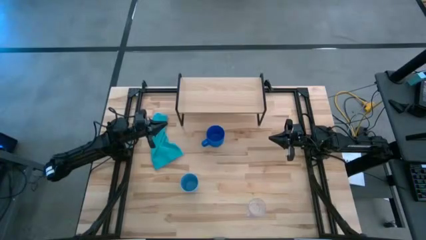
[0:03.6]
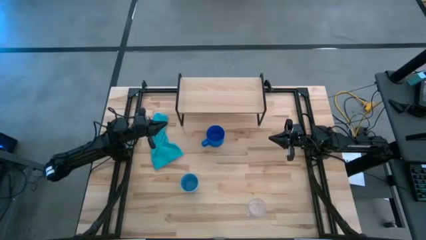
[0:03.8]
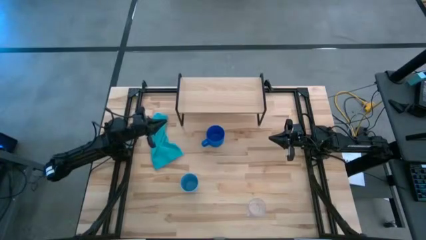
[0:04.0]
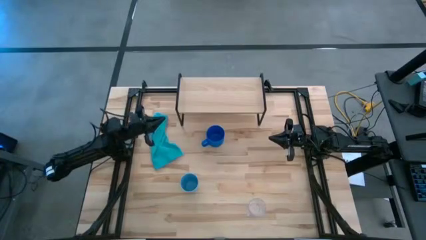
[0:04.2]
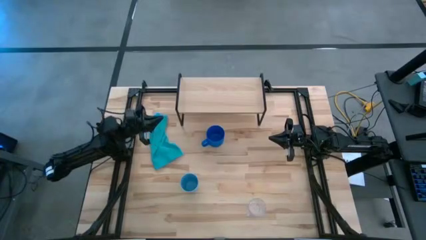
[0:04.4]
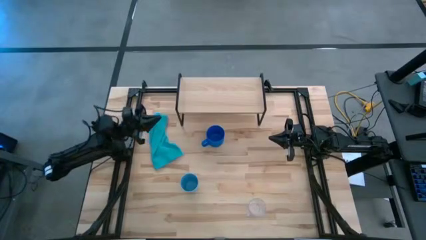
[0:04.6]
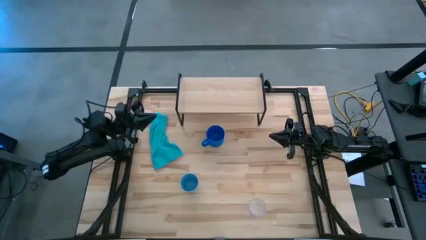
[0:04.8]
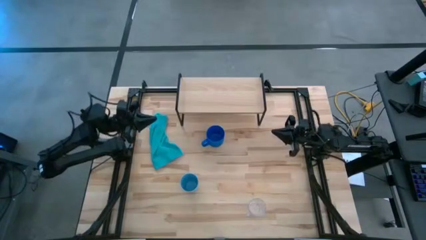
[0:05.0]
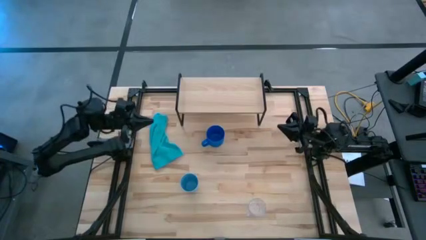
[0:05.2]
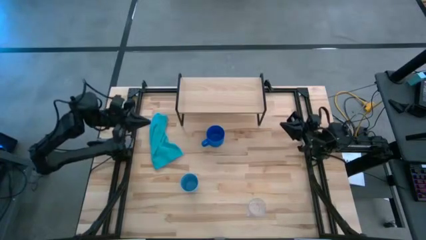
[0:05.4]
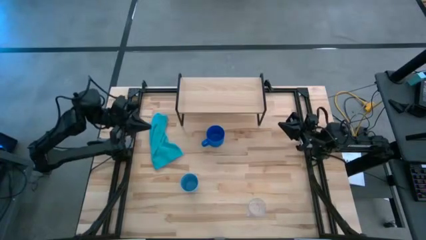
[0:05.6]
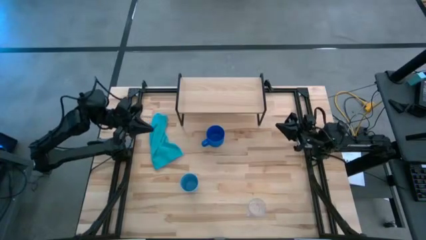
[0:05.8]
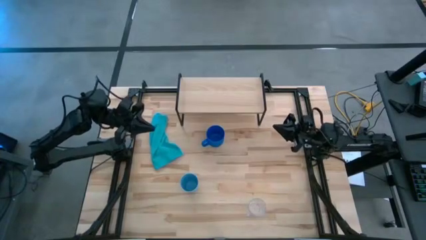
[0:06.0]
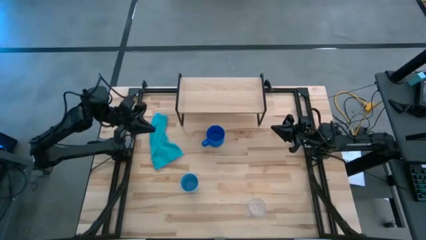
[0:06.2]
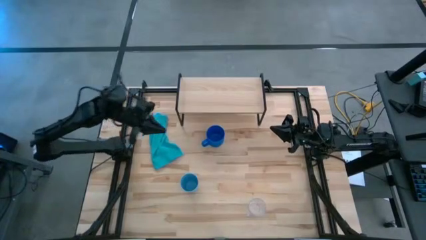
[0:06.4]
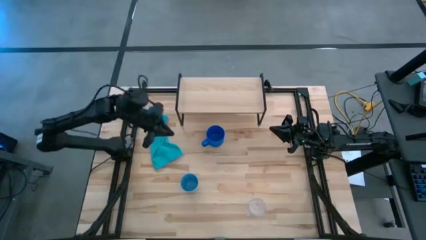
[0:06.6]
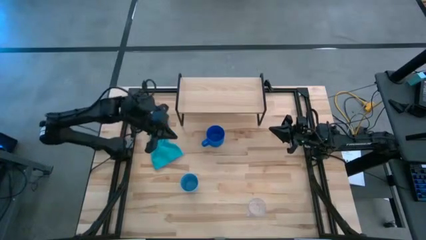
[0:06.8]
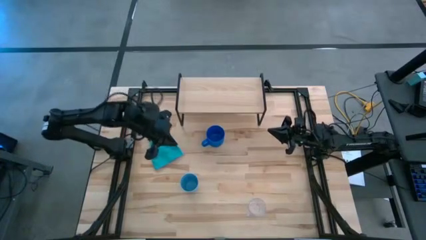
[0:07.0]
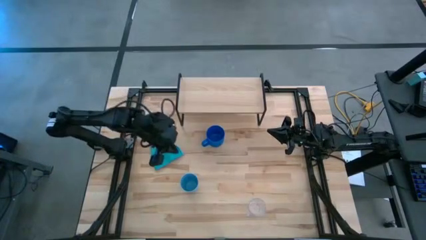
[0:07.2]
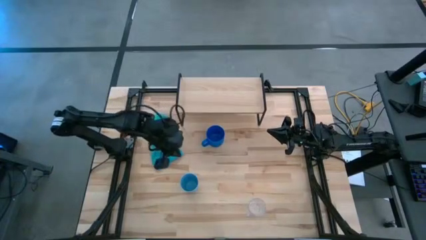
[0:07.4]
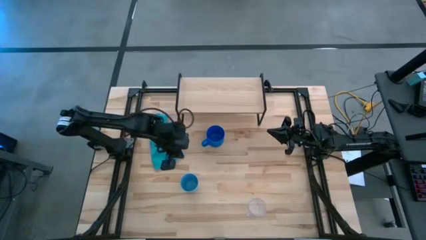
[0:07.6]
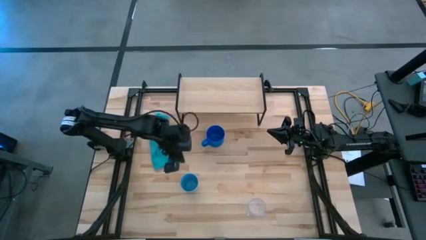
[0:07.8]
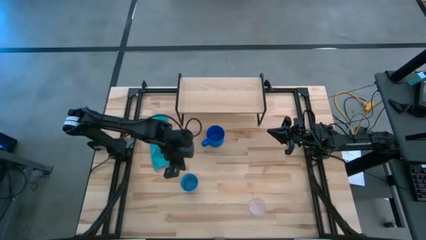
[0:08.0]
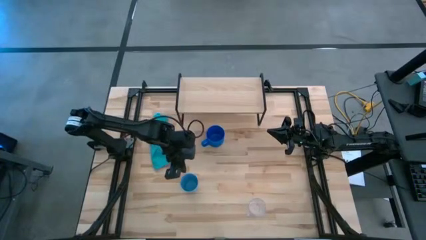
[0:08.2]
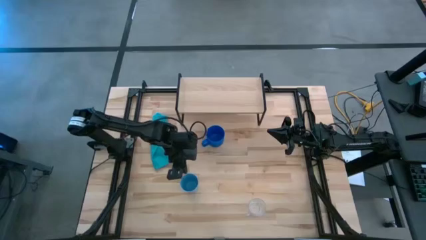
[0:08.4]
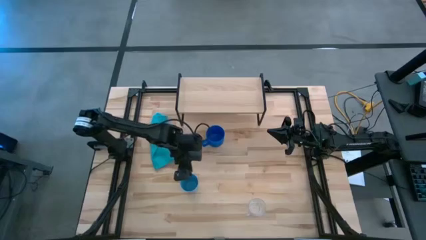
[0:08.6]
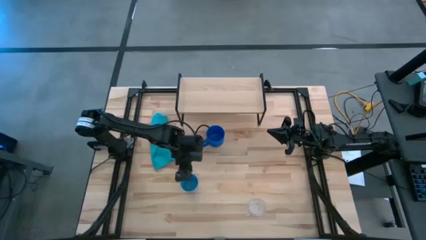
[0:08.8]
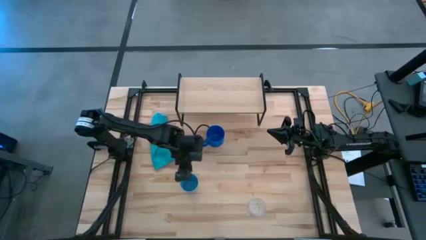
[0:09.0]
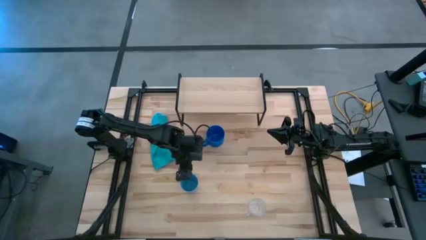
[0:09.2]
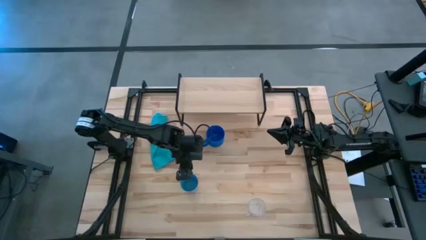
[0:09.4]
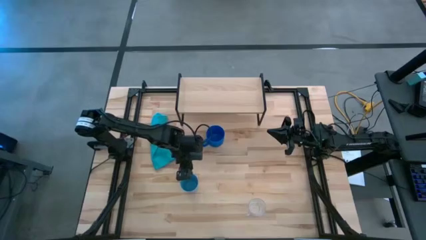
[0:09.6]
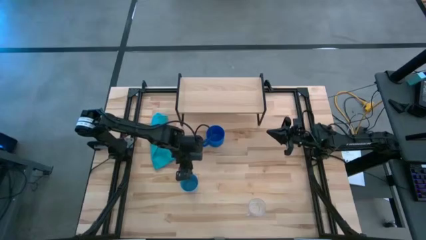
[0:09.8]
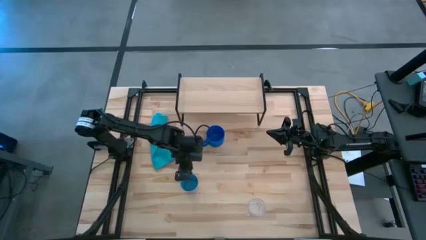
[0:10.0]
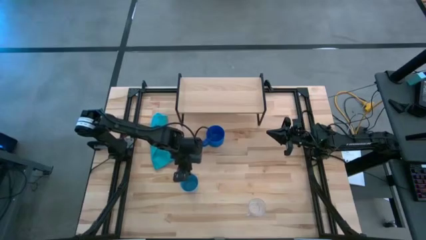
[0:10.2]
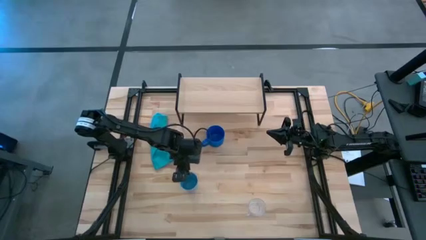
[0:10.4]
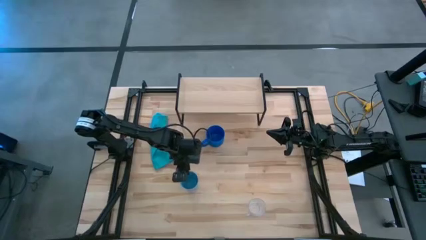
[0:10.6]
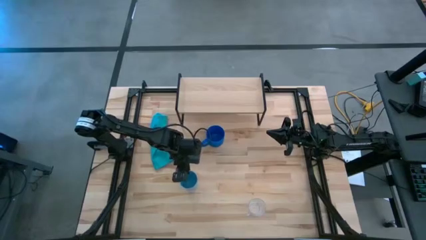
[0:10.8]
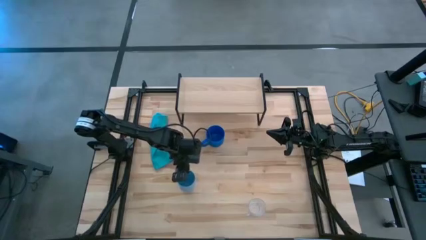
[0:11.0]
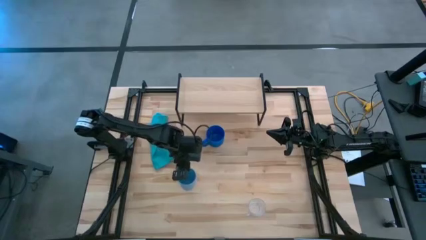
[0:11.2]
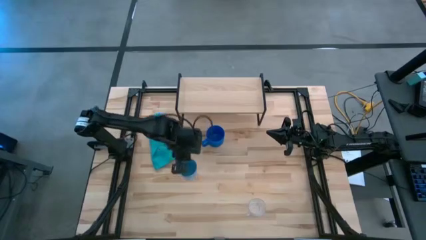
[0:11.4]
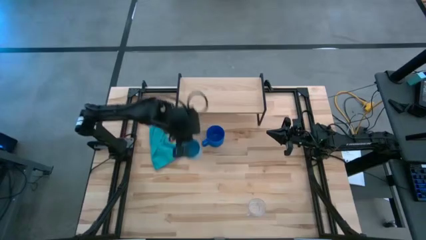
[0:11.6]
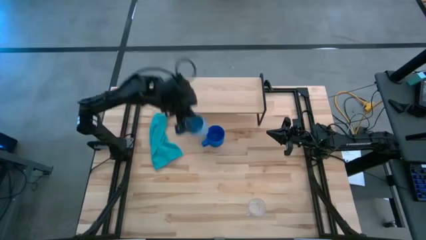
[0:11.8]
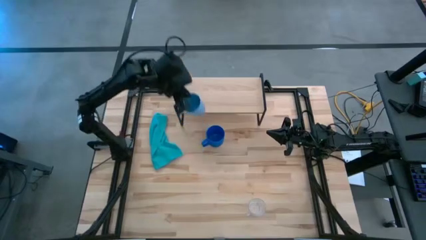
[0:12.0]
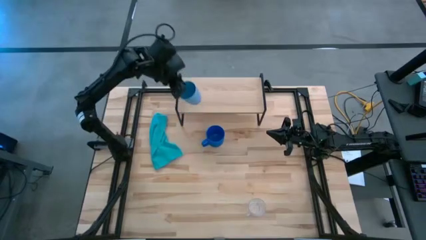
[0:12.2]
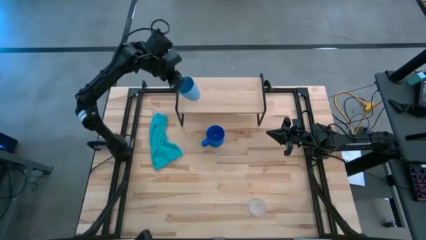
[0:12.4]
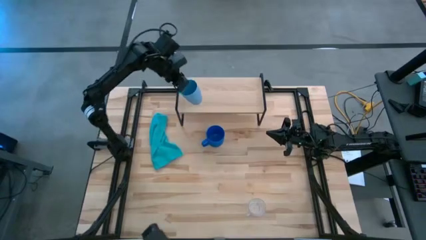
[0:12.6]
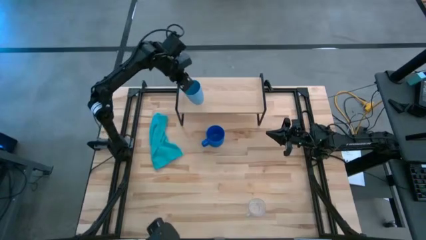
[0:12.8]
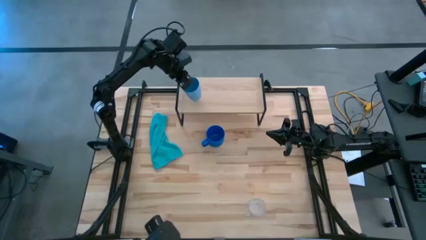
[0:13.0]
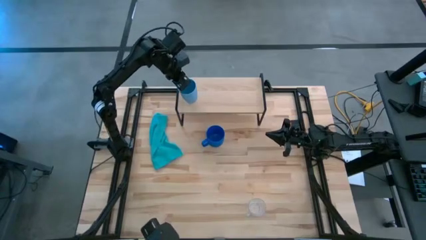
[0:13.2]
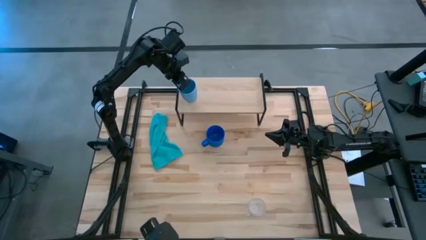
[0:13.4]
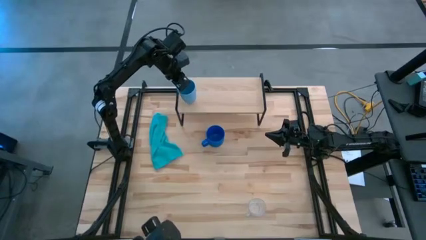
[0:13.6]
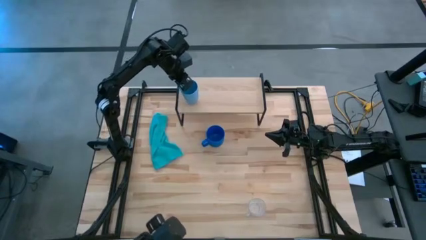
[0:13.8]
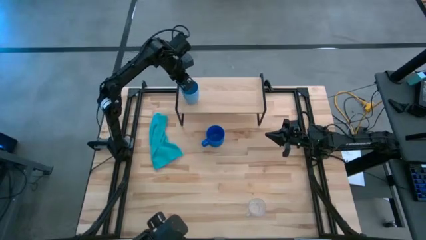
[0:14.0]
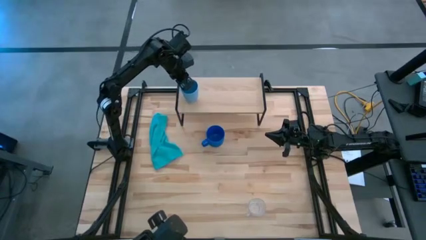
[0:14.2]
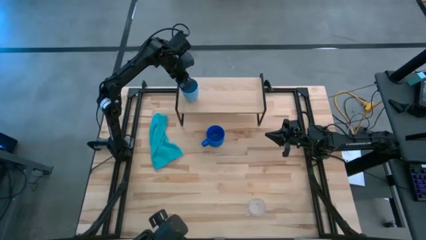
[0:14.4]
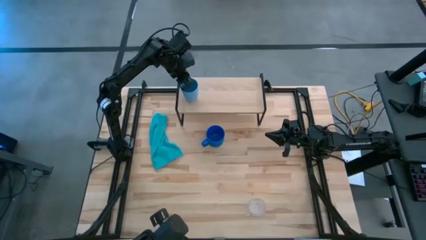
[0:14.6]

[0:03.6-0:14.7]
Task: Stack small to large cups/mugs on shelf
Put the blue cup on the shelf

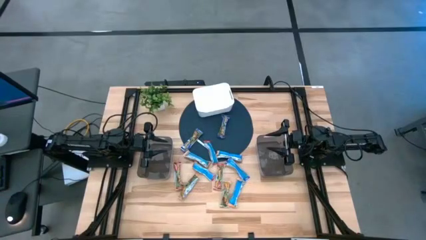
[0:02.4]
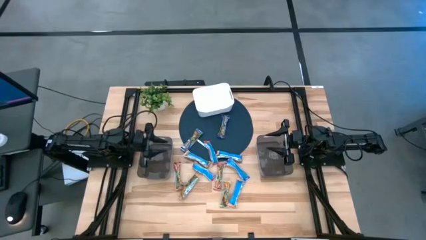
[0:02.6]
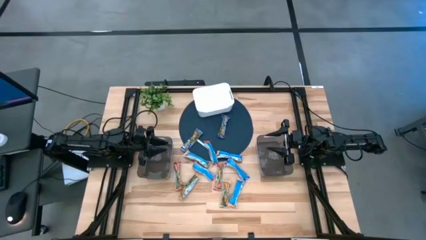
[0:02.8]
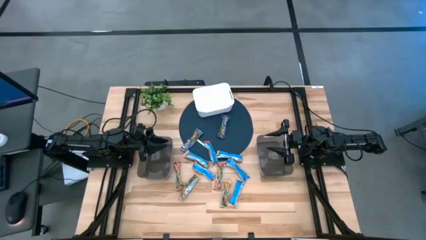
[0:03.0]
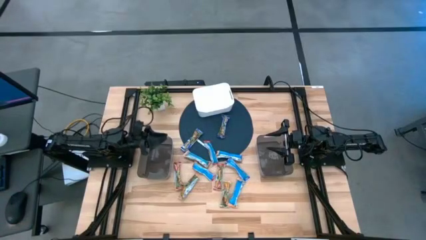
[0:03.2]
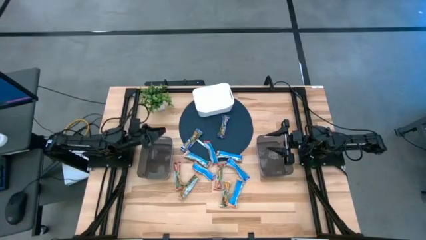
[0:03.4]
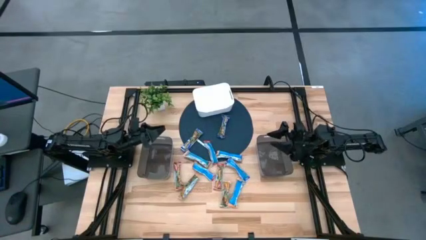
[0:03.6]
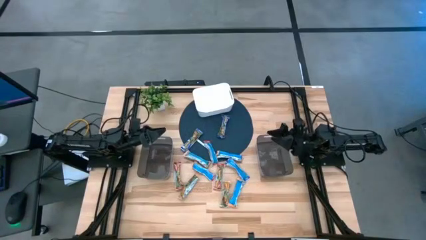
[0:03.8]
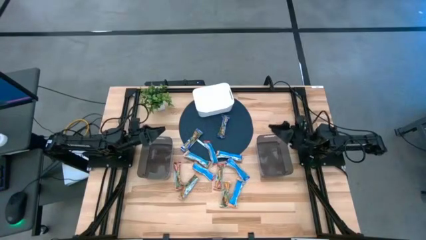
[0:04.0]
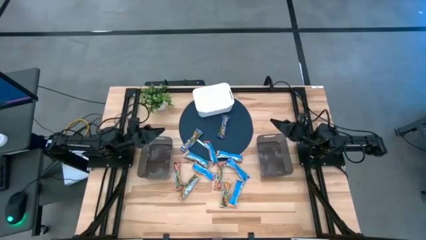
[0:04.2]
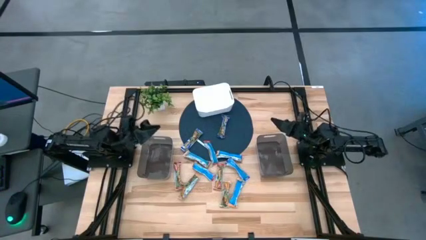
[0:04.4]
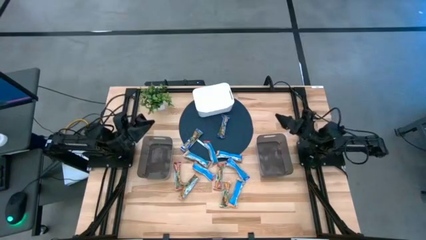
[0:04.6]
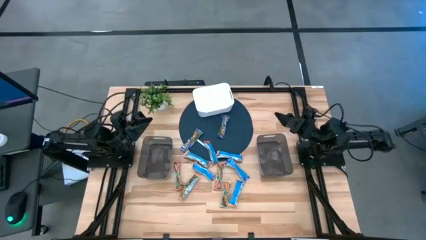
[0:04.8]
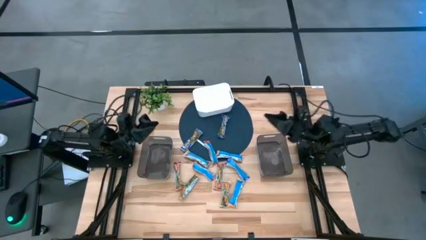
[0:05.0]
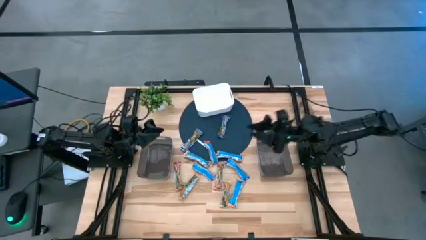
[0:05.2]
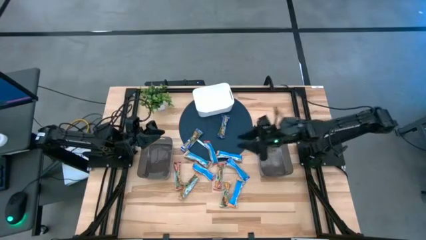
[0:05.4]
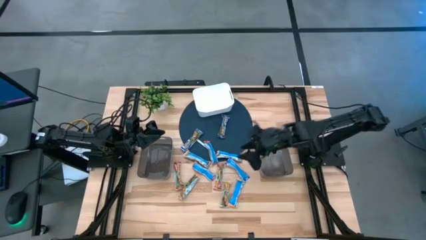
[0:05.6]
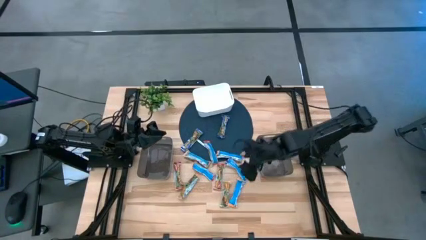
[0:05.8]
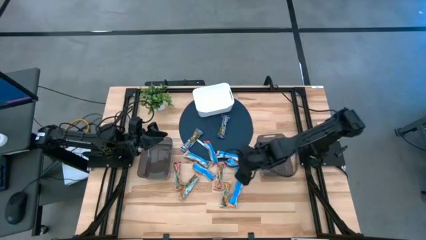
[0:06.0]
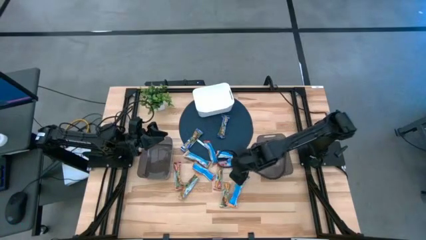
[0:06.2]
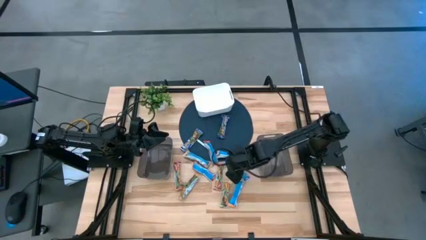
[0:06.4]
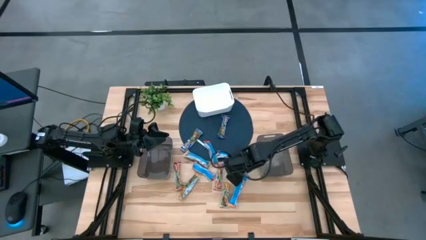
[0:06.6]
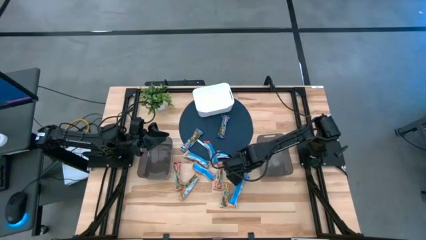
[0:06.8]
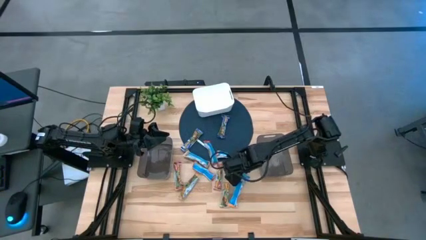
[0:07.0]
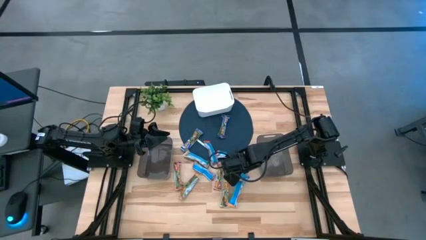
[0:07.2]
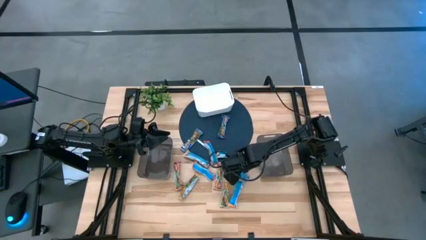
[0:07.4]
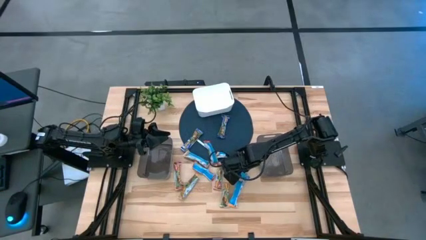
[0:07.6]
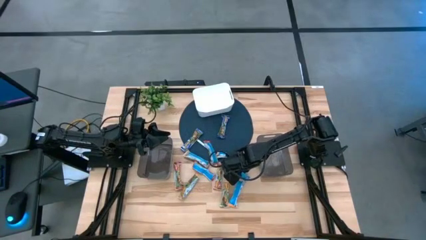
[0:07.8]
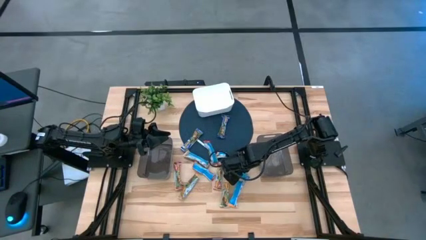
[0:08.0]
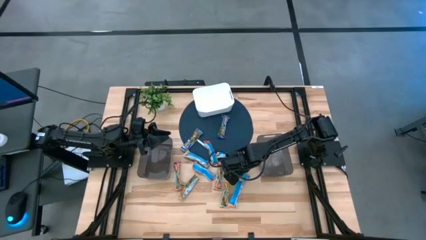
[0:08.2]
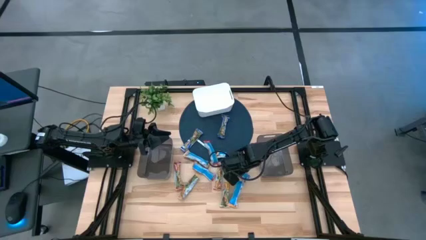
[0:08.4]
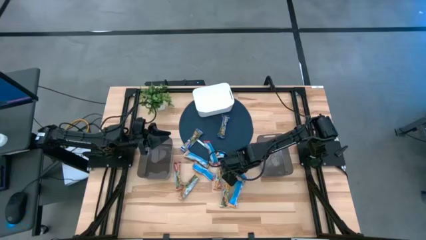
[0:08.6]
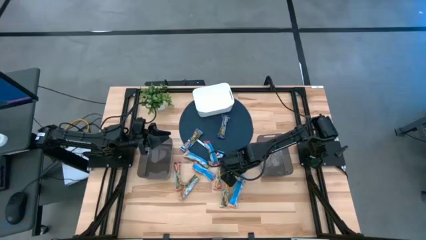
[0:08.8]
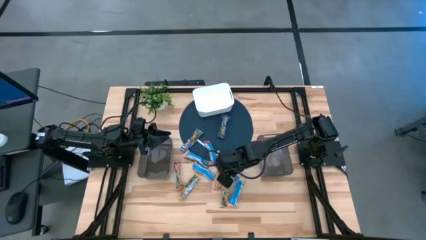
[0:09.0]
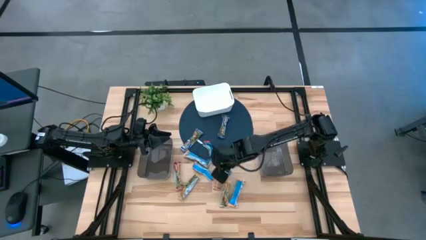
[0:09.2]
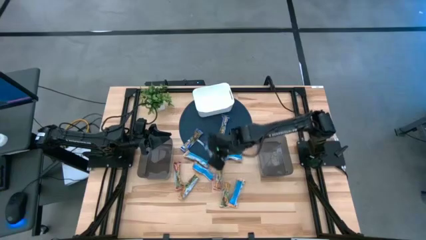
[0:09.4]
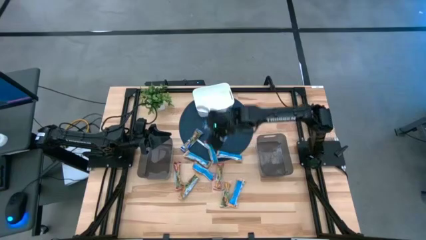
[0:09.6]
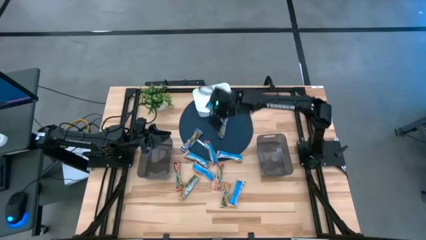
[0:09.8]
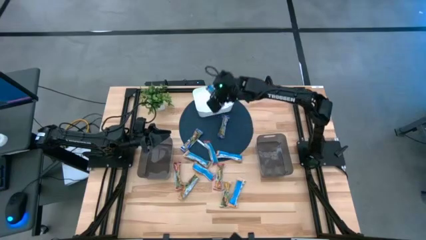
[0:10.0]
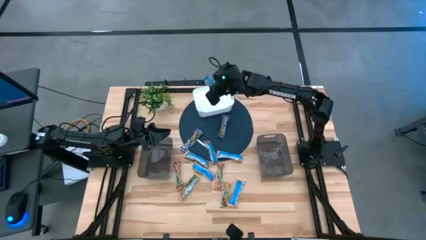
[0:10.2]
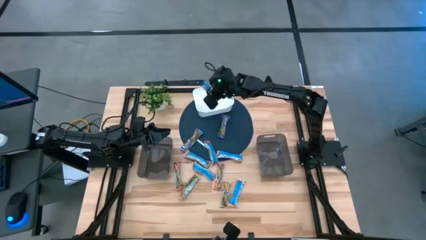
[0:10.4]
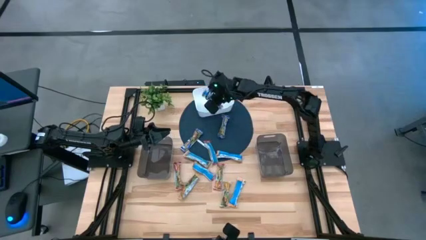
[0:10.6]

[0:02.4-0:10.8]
Task: Pick and place Granola Bars by type
Put the blue granola bar into the white bin
